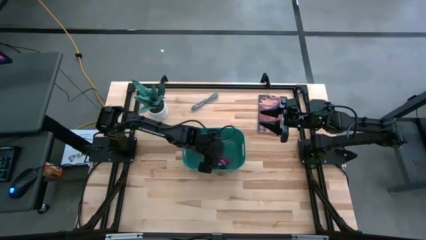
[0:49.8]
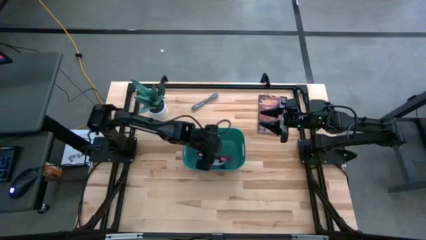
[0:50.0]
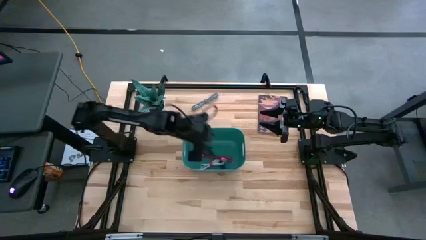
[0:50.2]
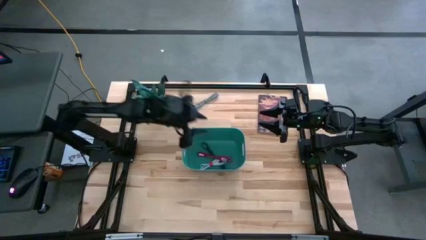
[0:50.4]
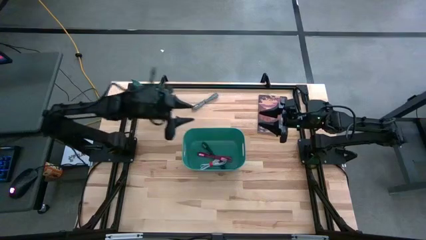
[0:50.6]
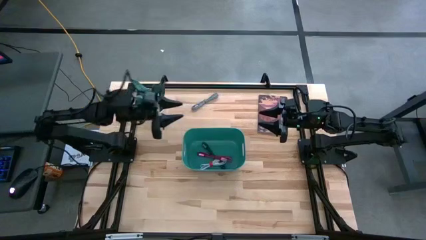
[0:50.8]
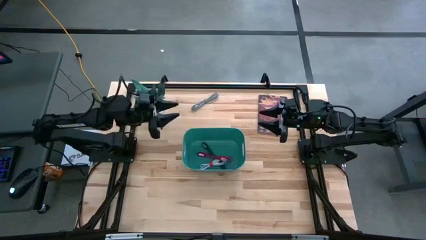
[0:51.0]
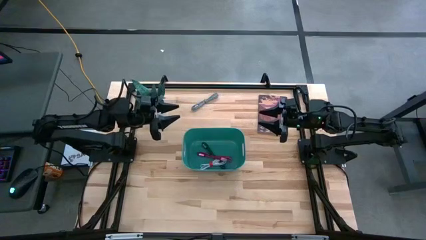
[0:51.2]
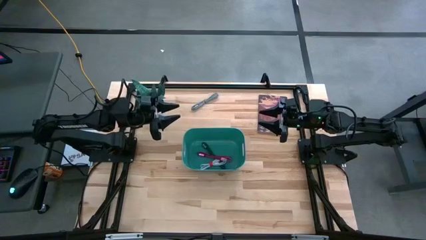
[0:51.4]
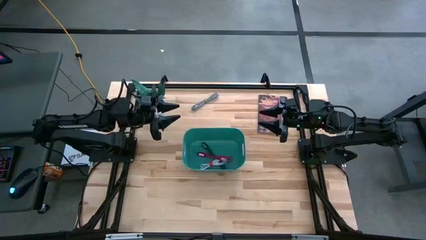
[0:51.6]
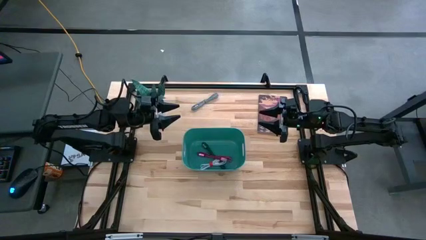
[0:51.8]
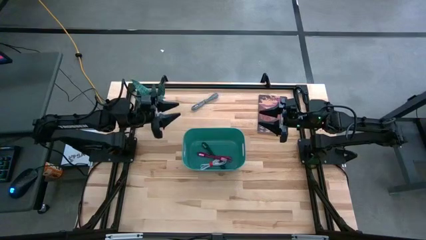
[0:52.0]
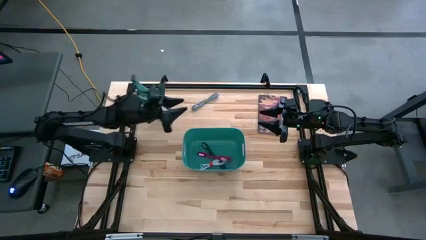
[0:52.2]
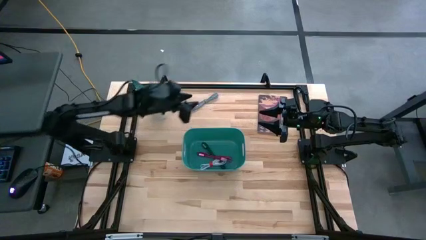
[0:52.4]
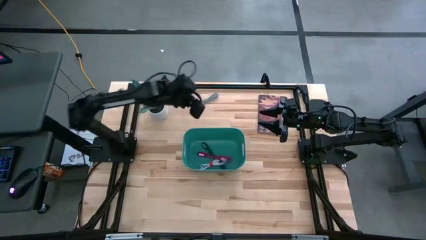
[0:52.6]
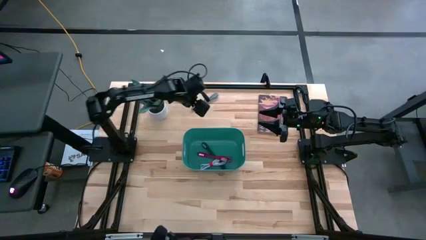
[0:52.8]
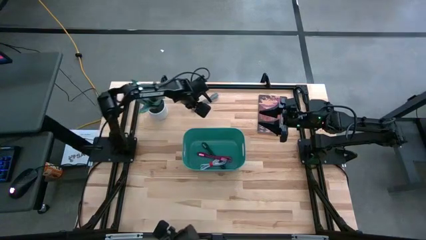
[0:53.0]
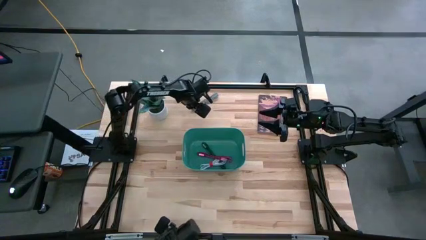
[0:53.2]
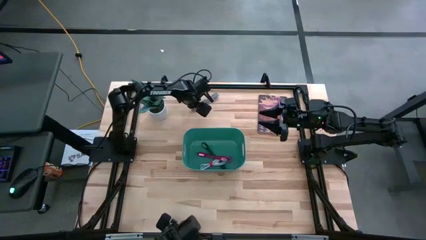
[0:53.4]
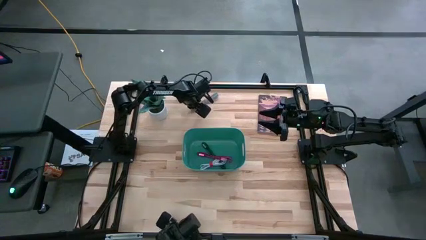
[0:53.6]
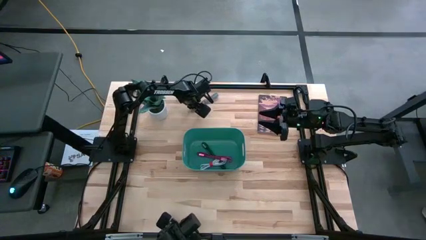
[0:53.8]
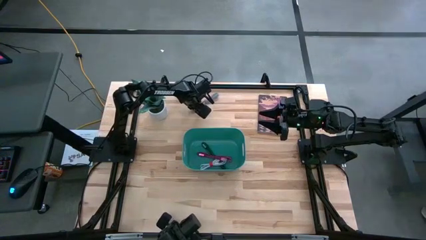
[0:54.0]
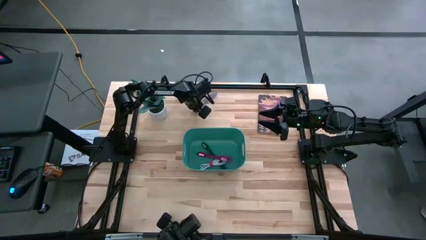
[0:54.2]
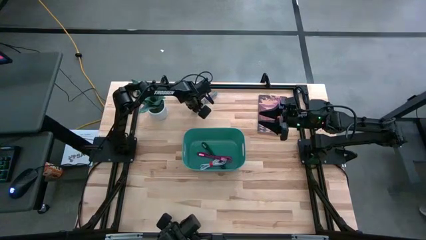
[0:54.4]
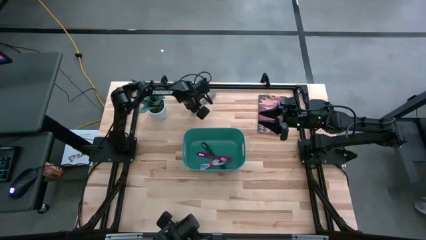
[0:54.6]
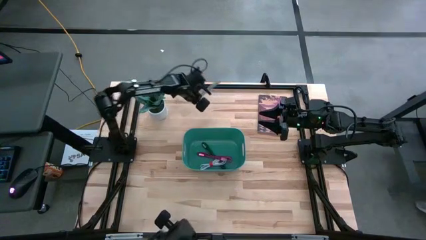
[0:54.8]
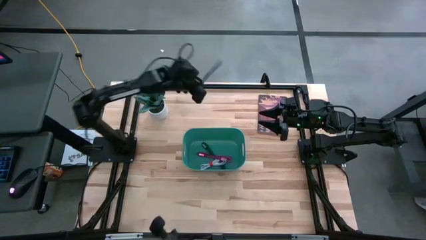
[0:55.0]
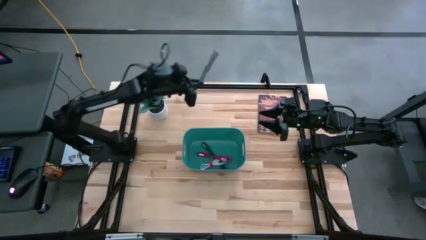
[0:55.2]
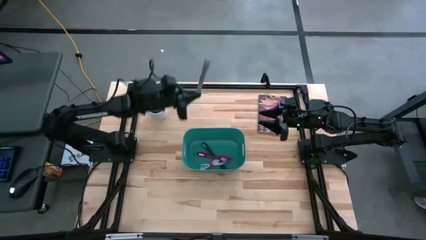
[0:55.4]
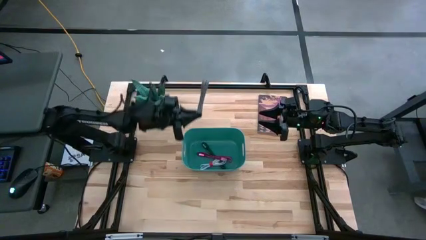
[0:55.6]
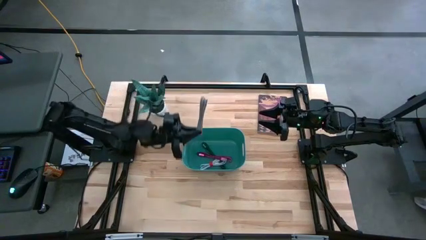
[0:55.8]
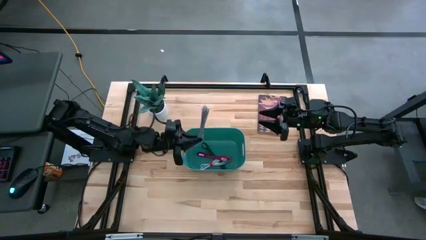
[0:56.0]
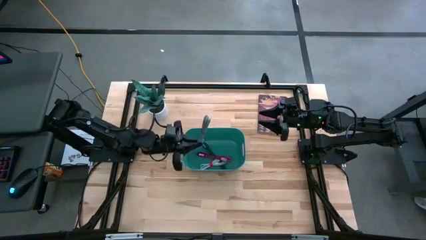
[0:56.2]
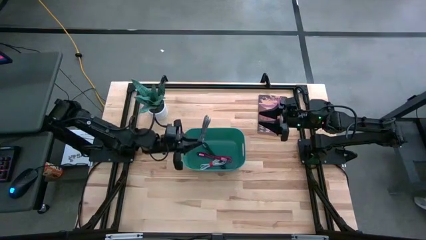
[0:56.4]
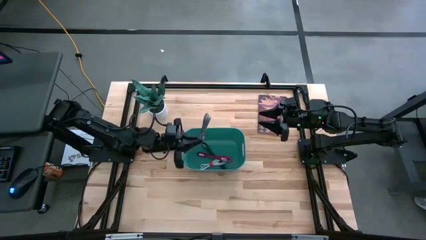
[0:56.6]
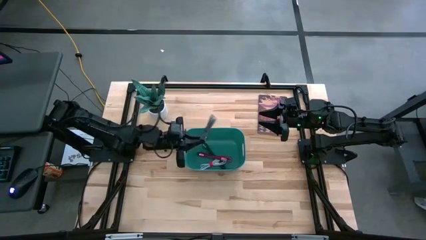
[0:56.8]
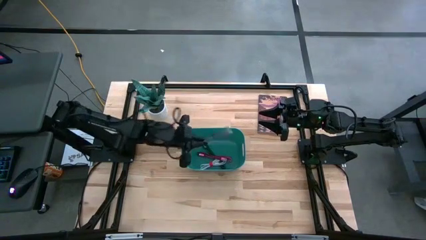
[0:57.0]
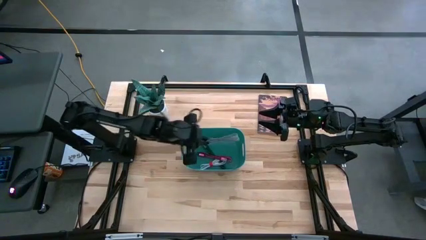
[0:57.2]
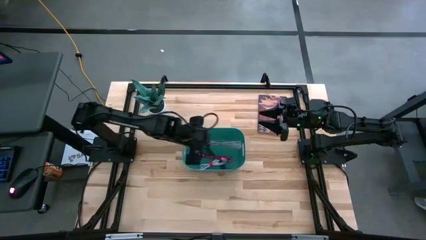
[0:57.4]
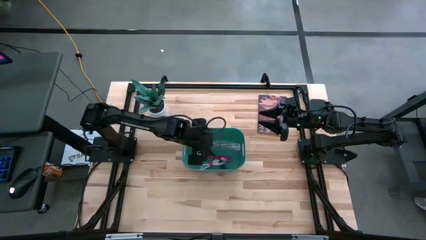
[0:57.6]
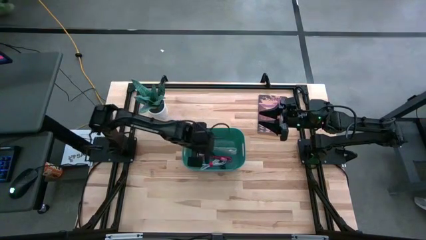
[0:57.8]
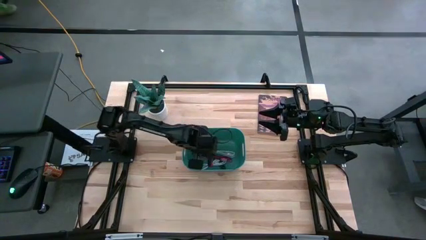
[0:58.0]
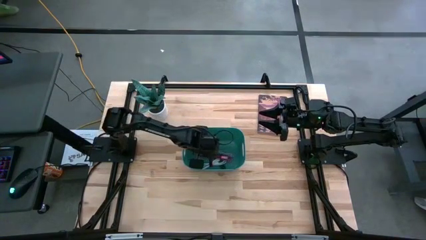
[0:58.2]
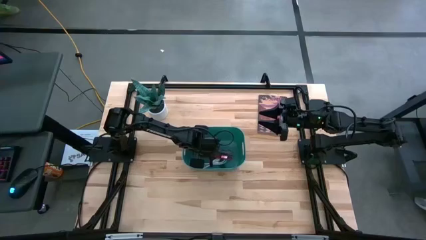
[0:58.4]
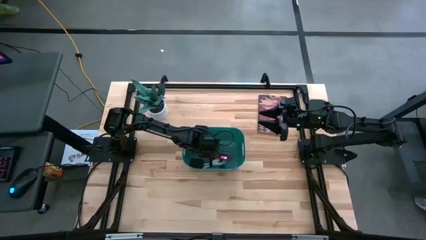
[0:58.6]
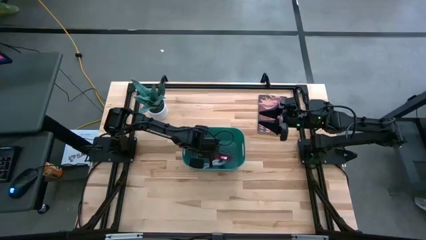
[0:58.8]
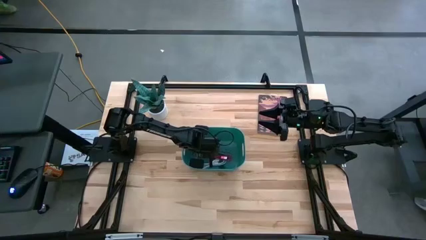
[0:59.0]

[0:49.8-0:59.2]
Task: Pick and place USB-C Cables
Put the gray charger cable into the green bin
